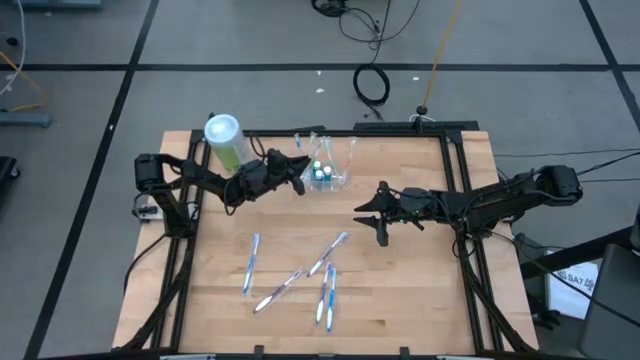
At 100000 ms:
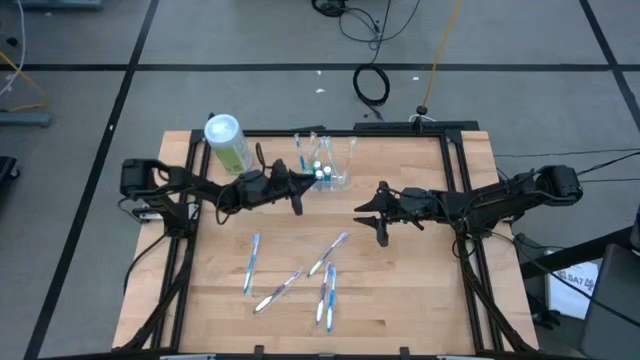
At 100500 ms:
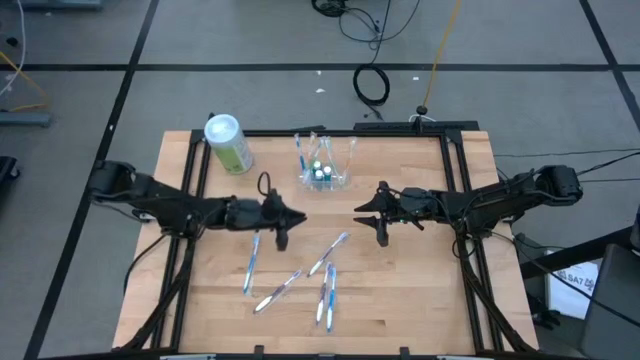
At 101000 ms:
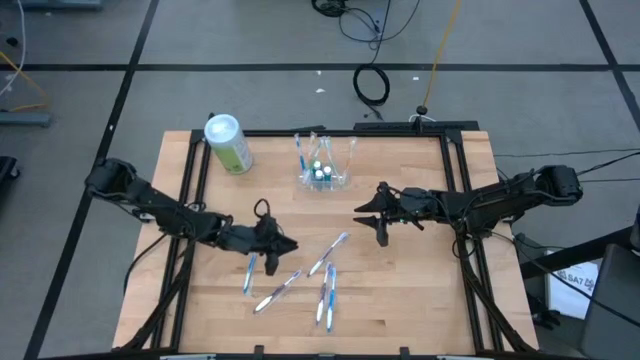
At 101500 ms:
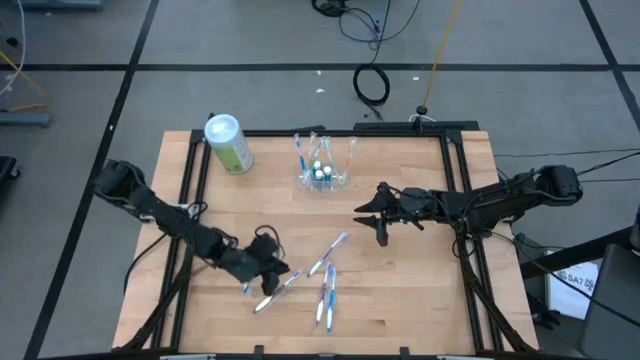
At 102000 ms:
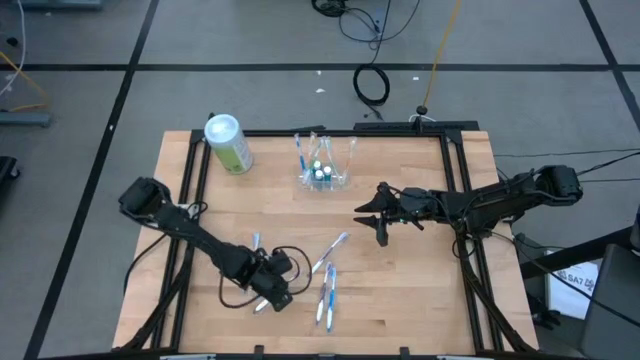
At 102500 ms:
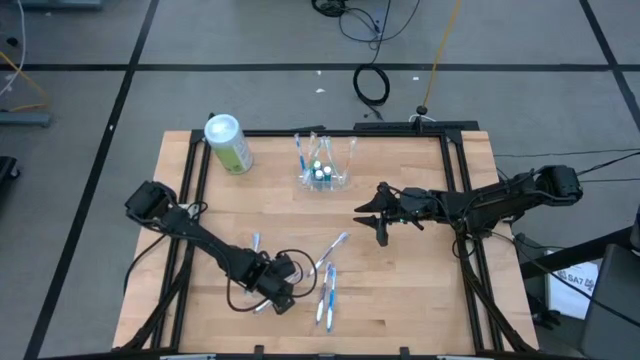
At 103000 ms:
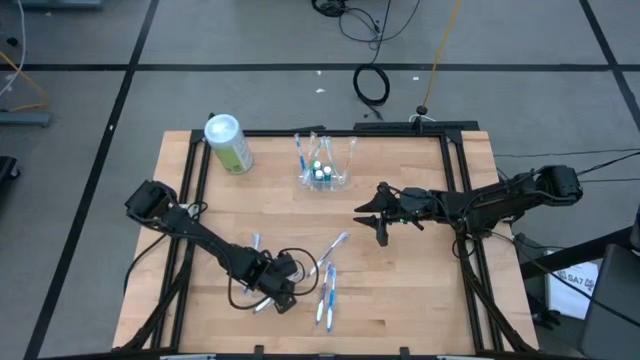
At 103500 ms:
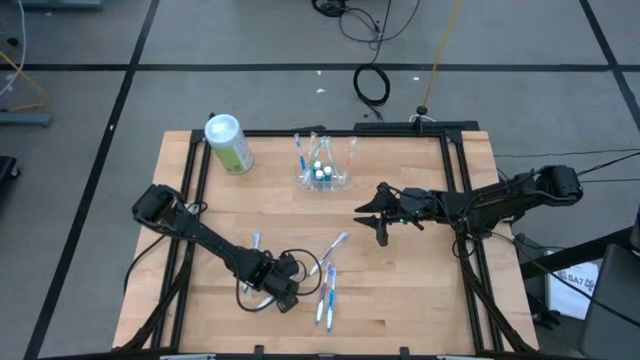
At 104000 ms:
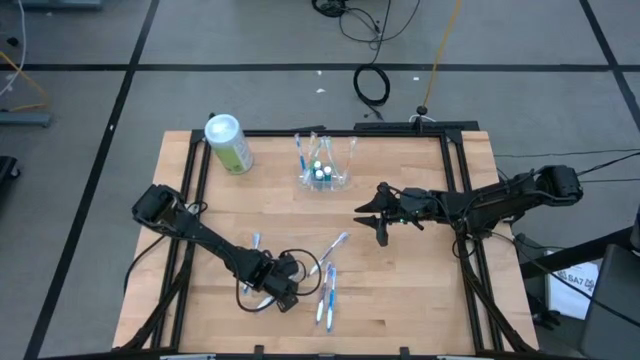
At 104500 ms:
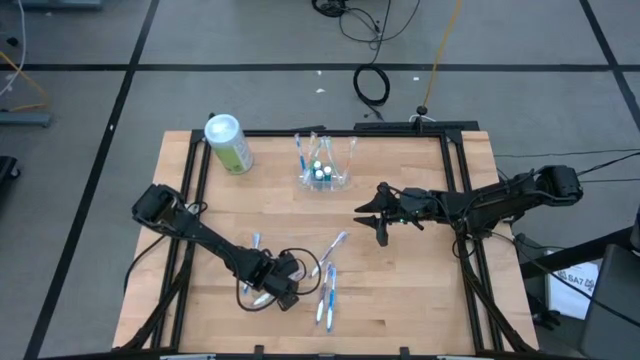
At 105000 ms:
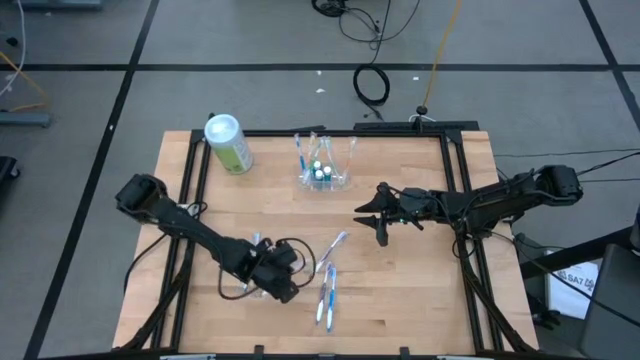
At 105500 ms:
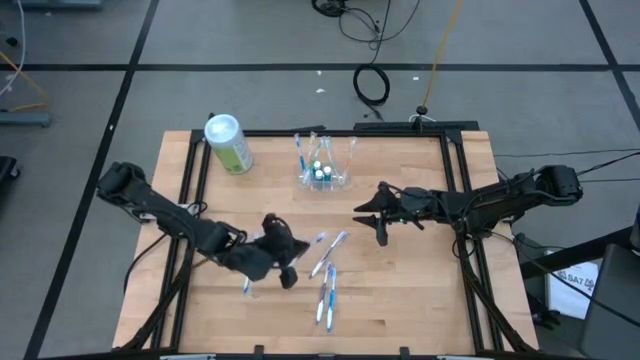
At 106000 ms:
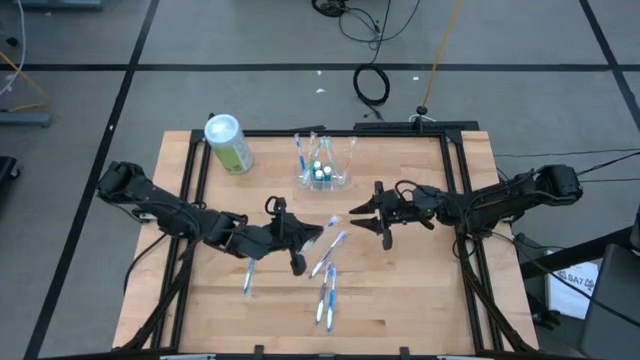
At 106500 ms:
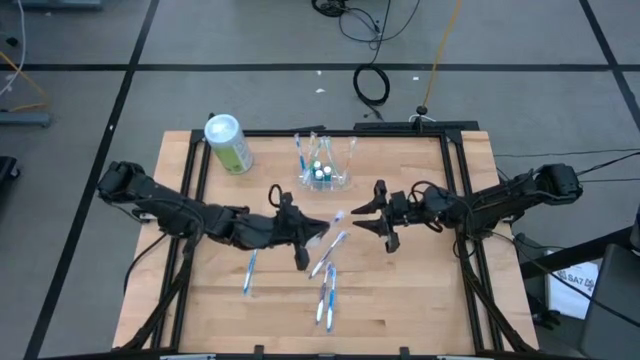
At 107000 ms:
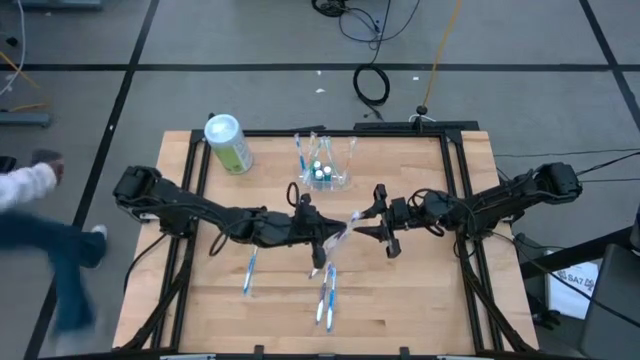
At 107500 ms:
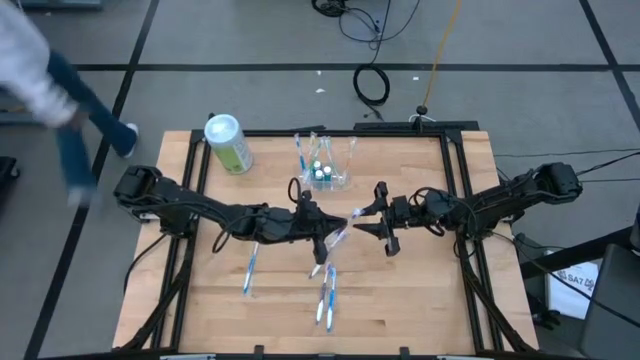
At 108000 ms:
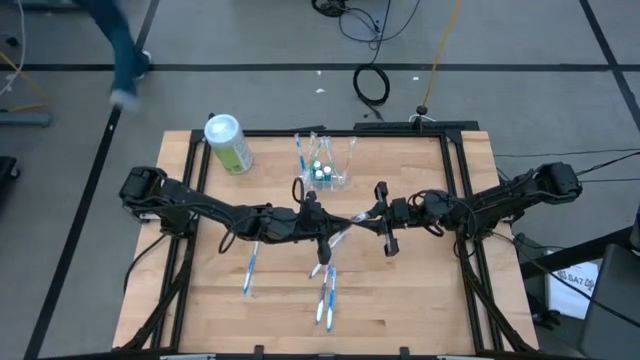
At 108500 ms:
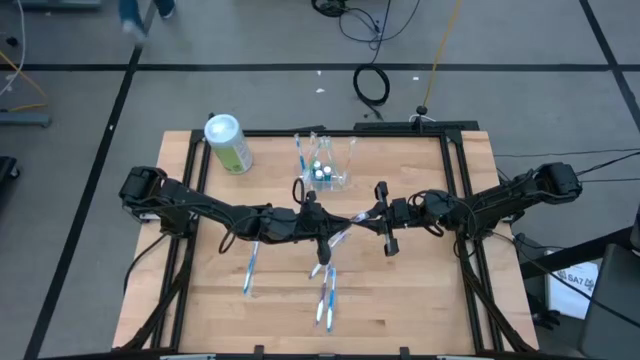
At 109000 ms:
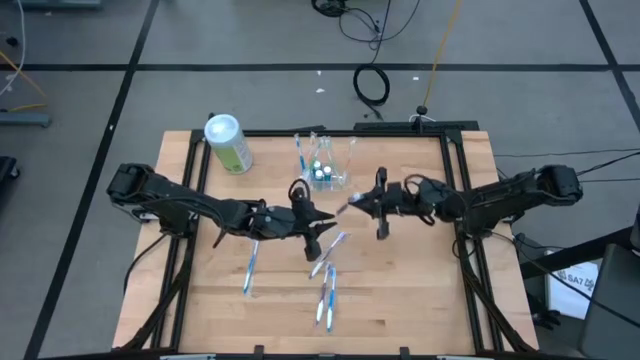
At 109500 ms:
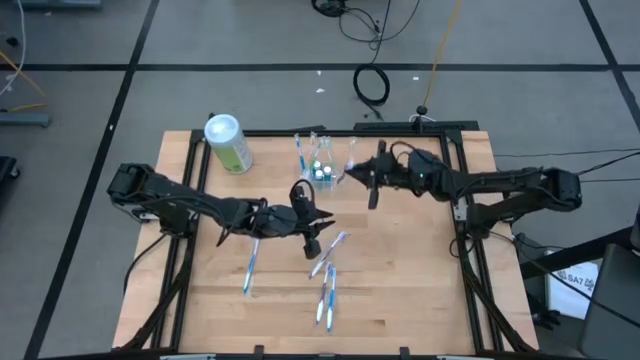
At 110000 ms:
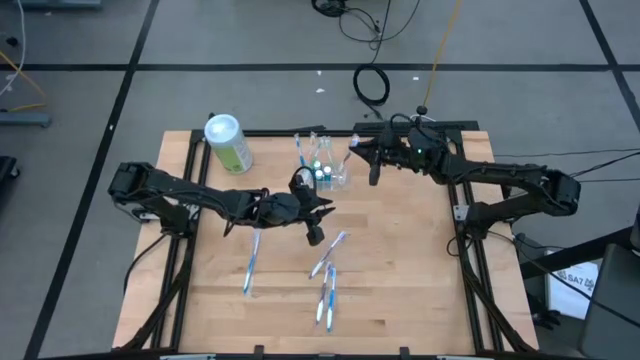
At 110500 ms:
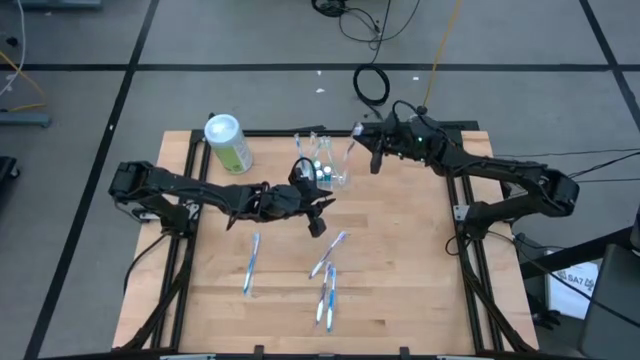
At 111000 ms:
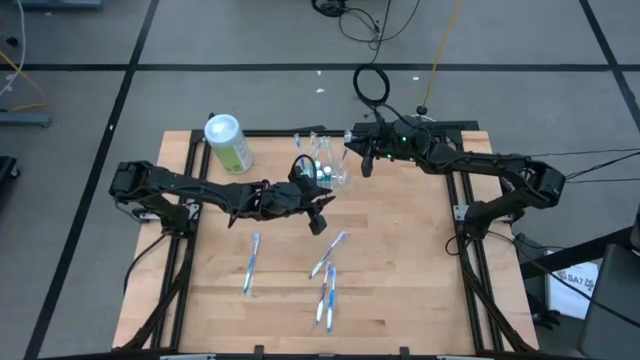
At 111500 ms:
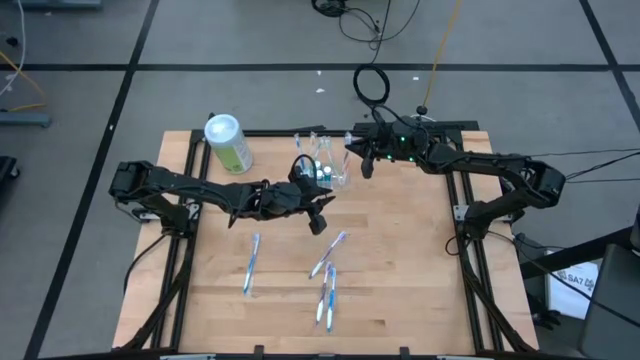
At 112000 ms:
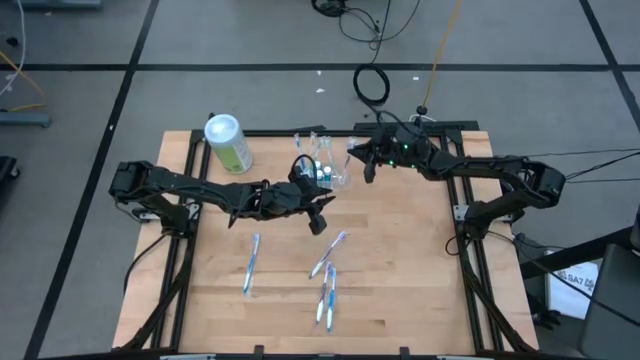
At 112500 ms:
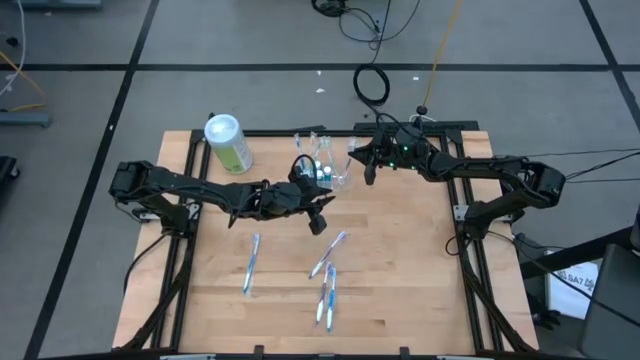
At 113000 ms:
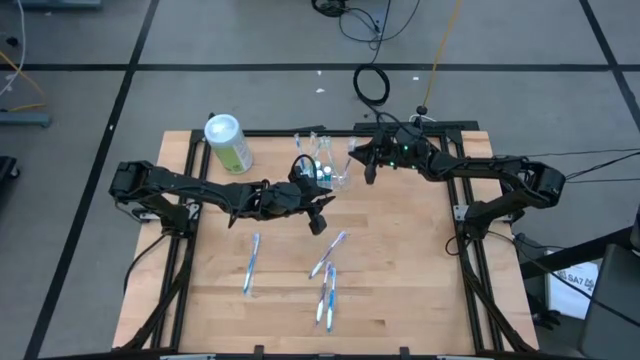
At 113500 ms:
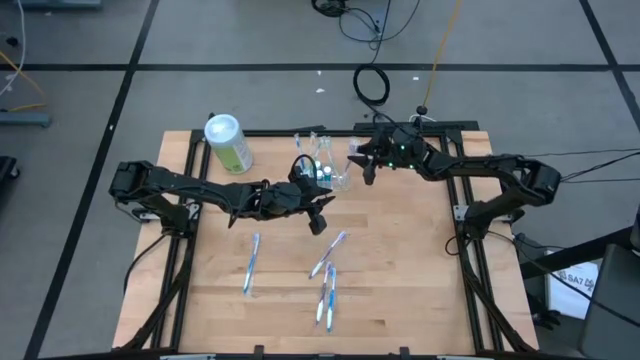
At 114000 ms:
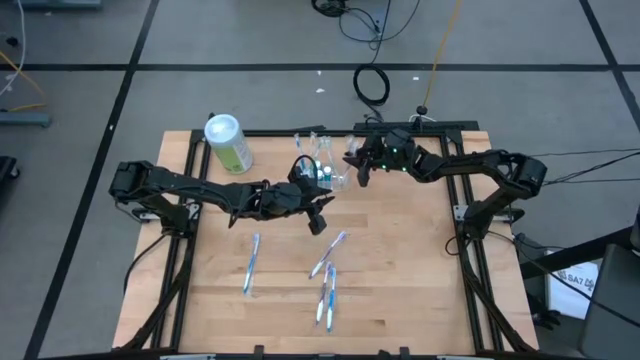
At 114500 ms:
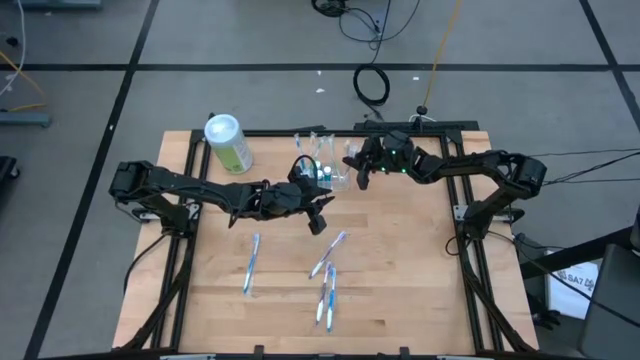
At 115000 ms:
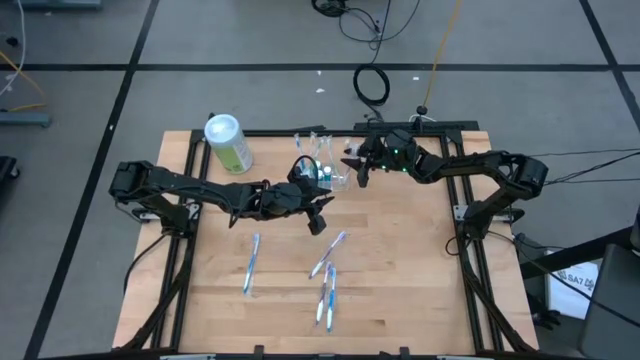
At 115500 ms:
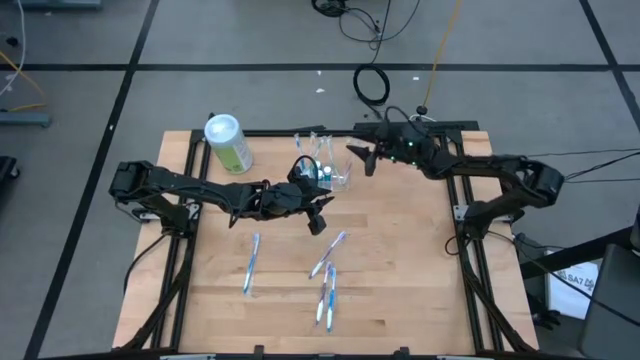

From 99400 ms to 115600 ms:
Task: Pick & Place toothbrushing station
Put the left purple toothbrush into the transparent organizer

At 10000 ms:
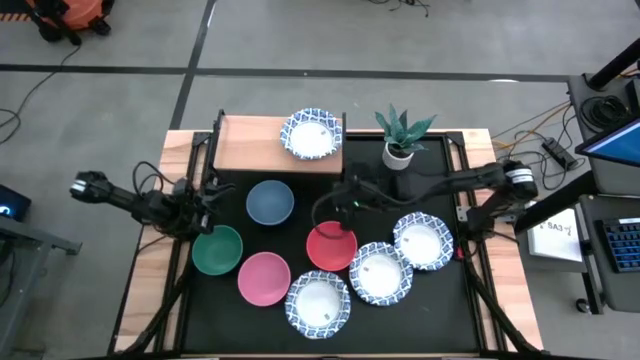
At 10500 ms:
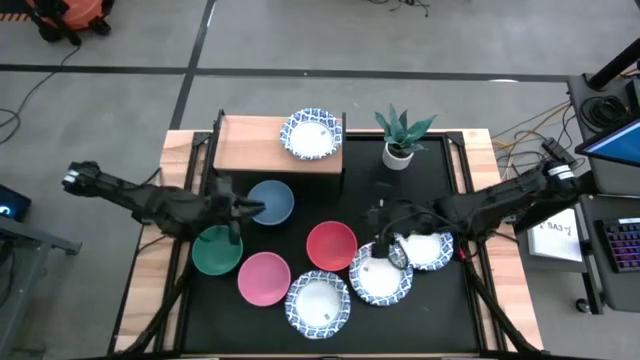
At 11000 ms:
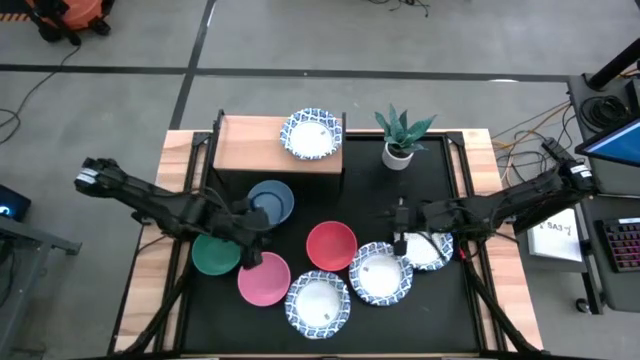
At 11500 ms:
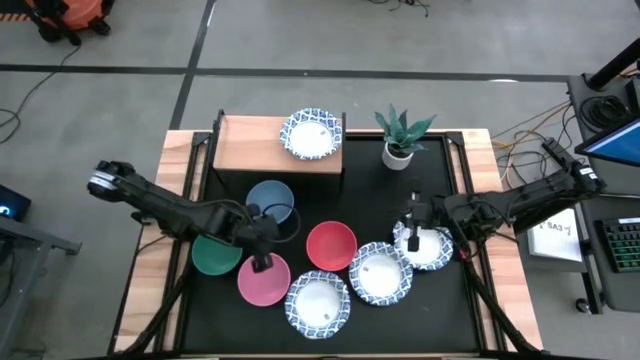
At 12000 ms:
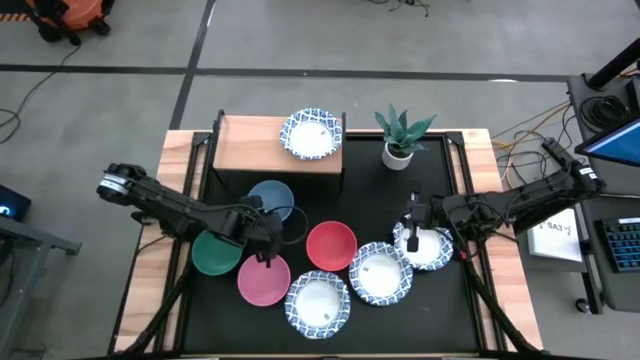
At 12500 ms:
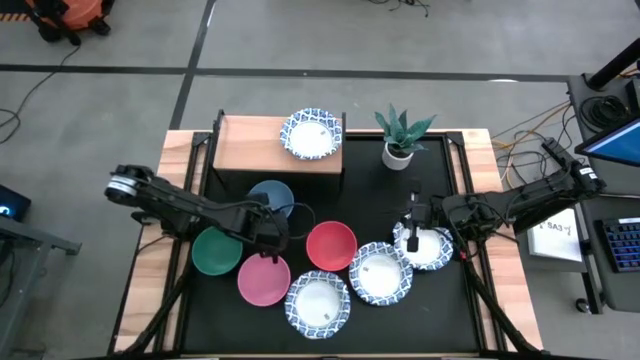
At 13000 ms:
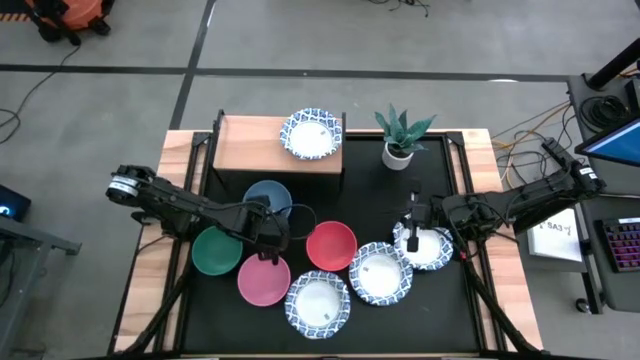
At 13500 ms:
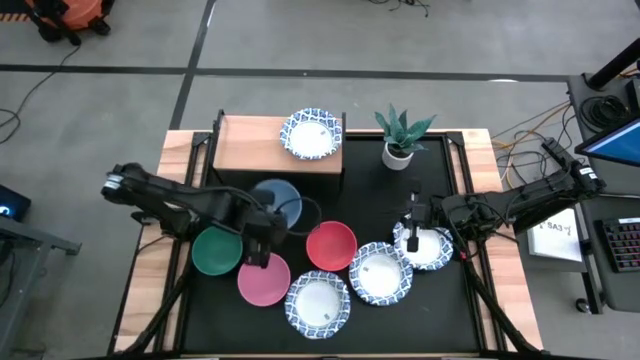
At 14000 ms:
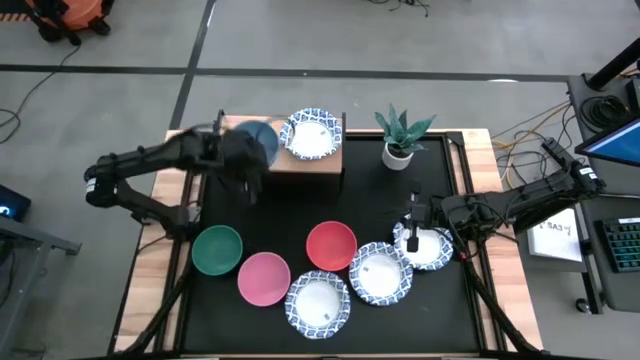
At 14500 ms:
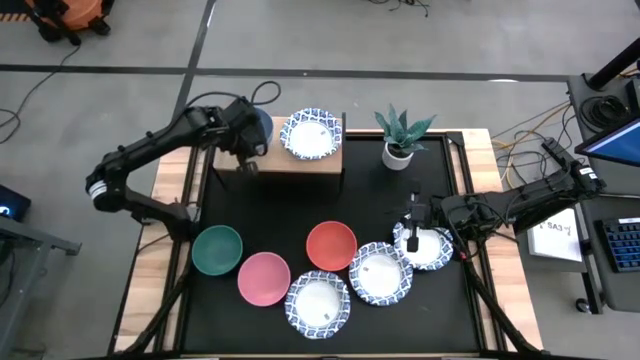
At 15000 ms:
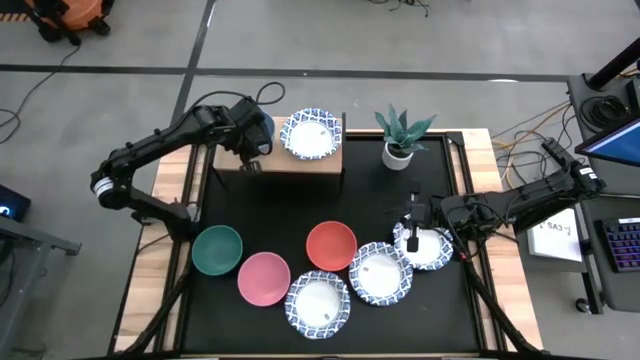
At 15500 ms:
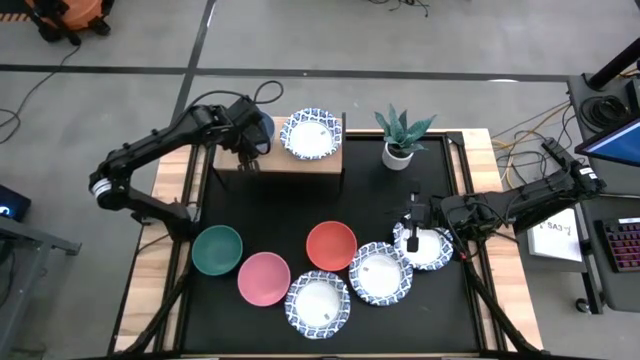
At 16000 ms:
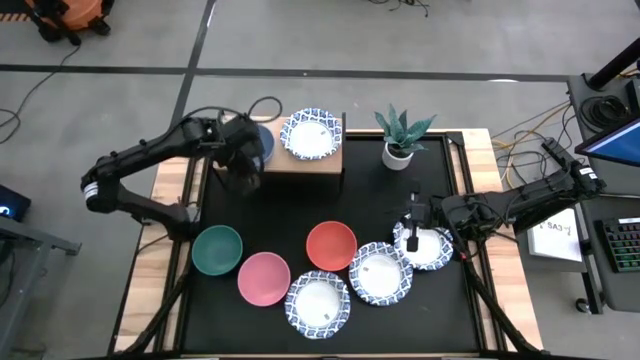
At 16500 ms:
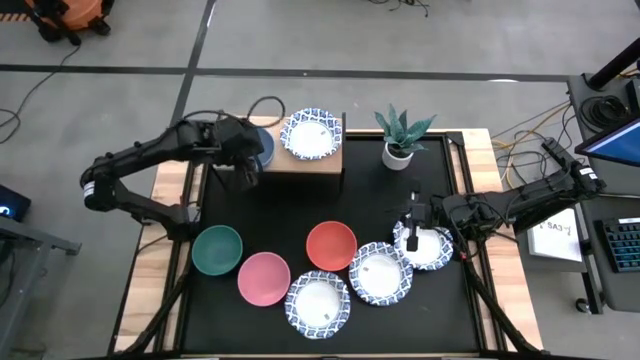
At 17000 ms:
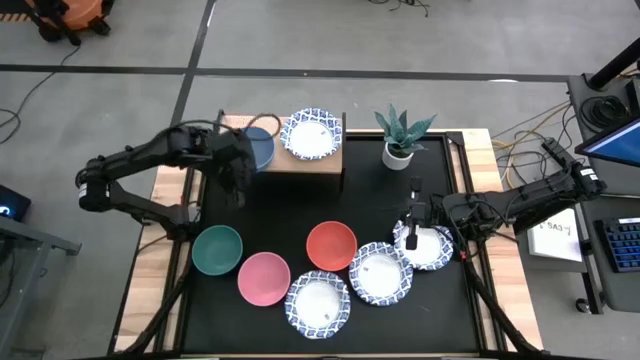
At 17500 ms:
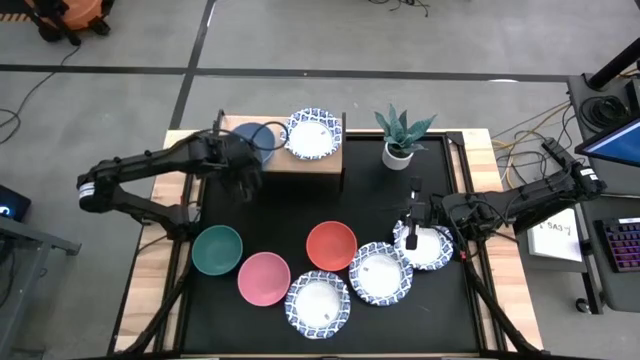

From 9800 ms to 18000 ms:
Task: Place and stack bowls onto a shelf
Put the blue bowl on the shelf
